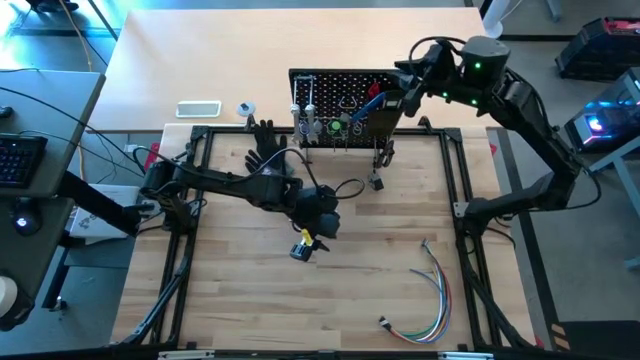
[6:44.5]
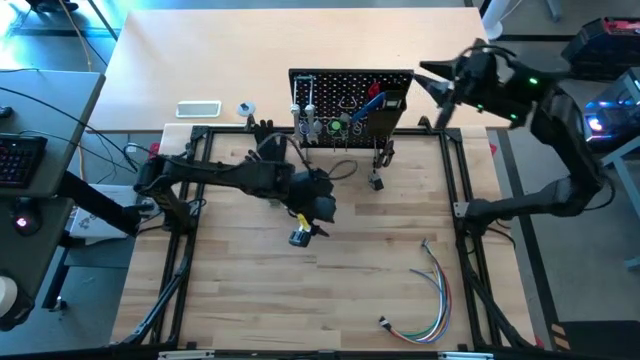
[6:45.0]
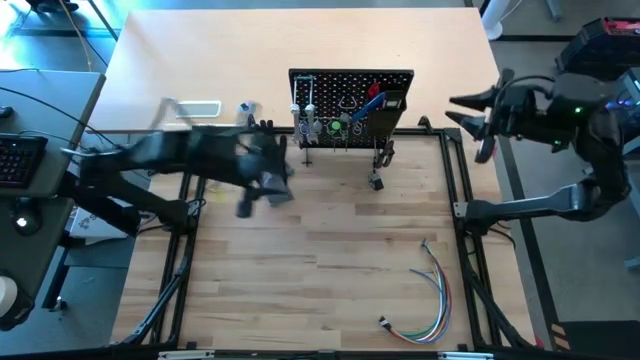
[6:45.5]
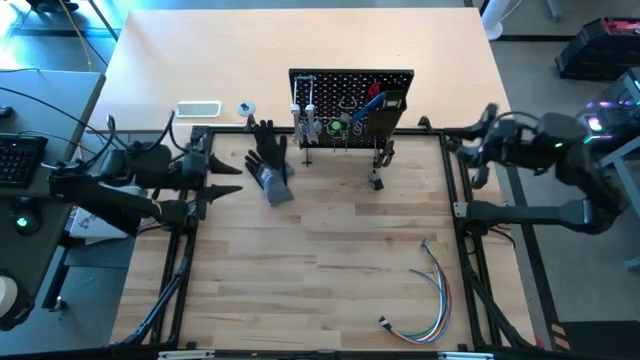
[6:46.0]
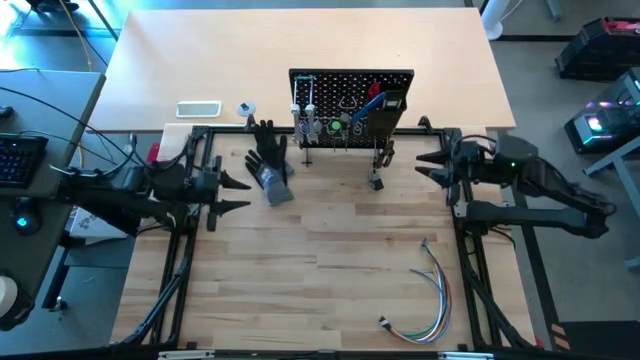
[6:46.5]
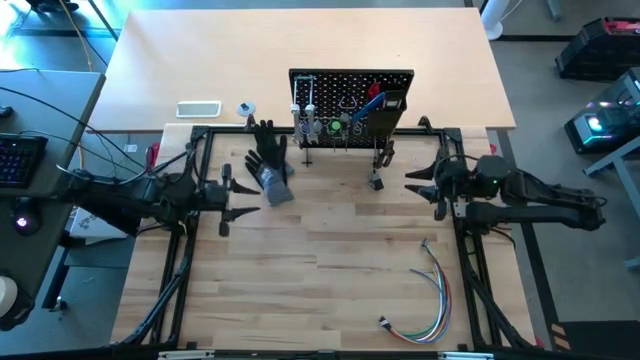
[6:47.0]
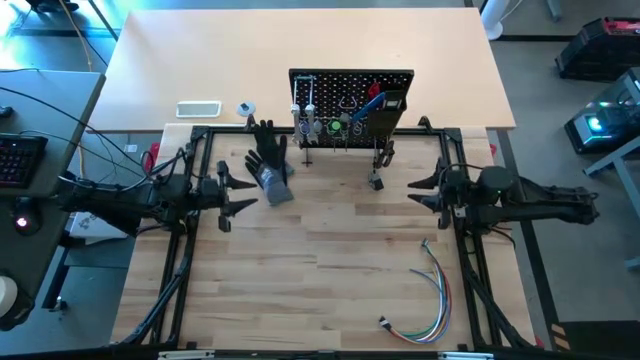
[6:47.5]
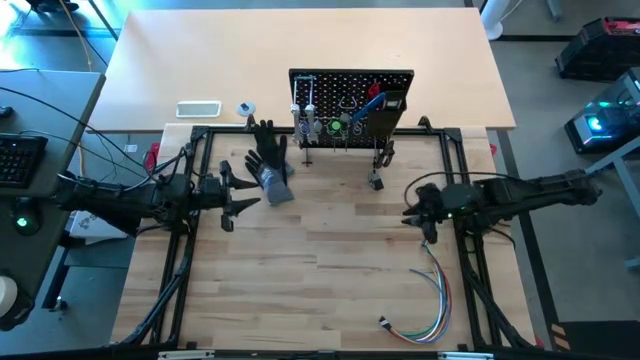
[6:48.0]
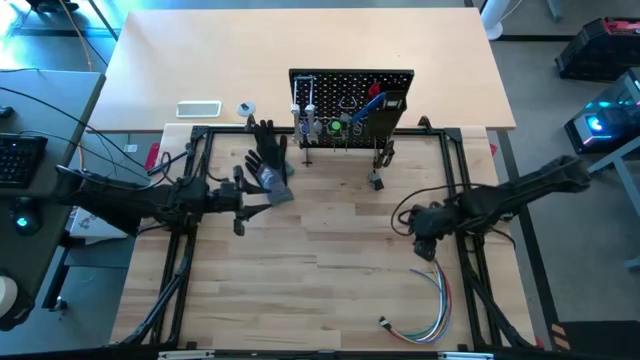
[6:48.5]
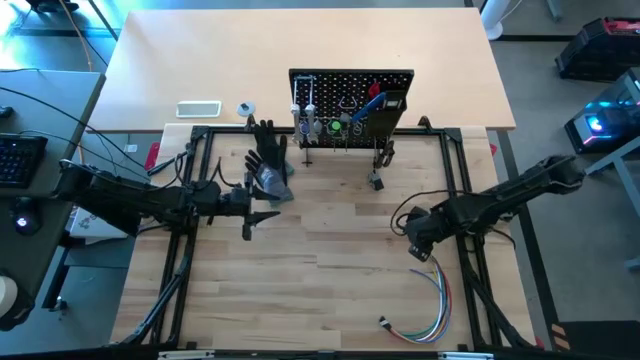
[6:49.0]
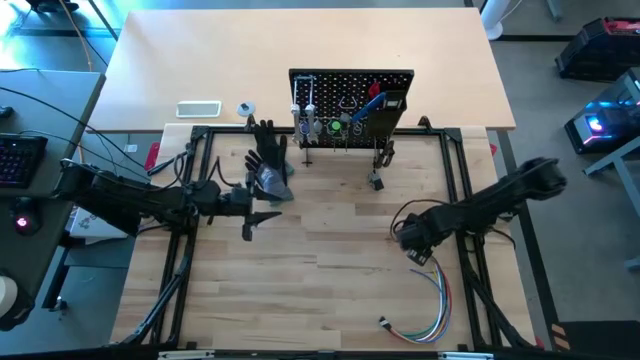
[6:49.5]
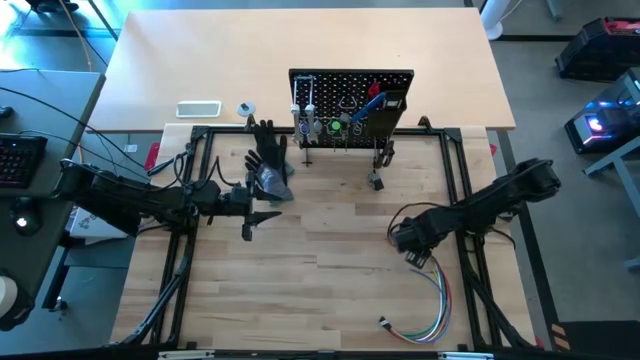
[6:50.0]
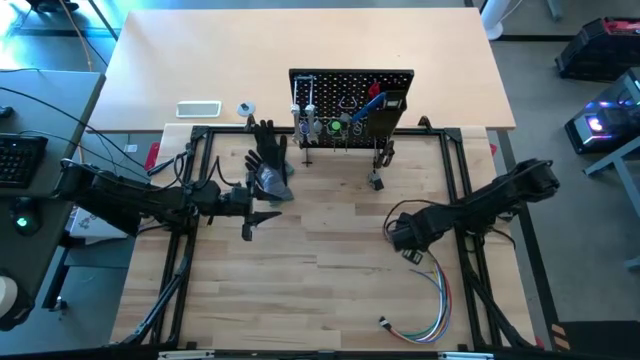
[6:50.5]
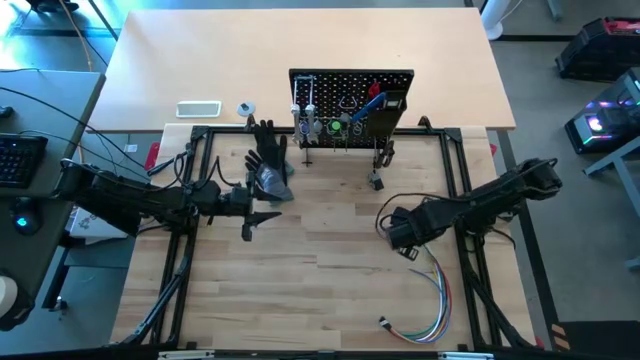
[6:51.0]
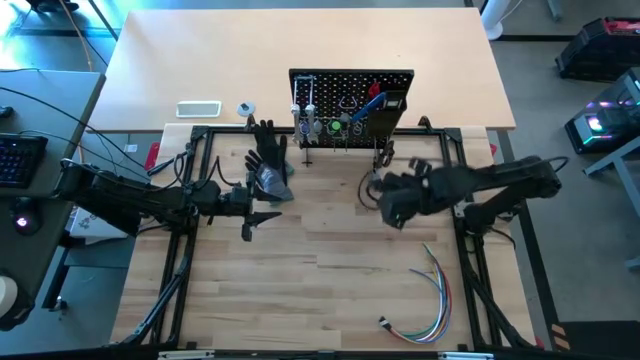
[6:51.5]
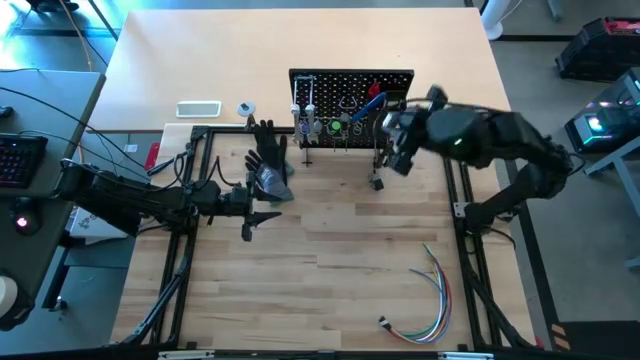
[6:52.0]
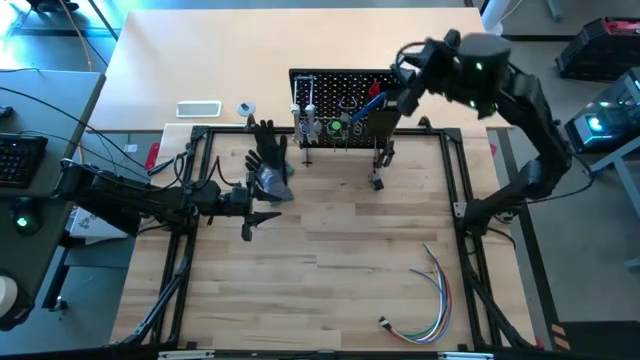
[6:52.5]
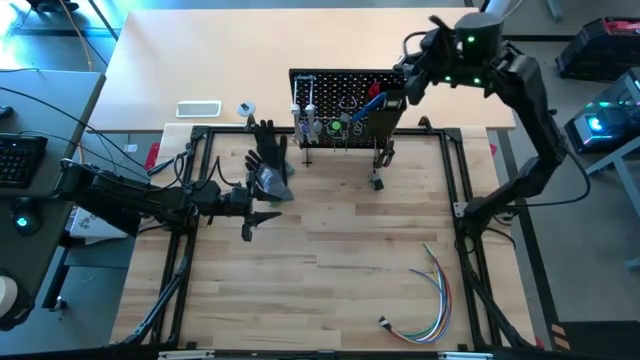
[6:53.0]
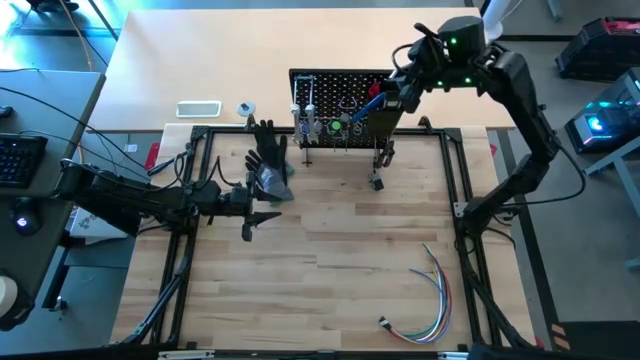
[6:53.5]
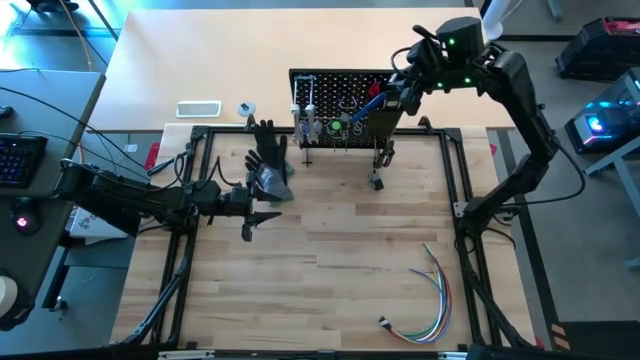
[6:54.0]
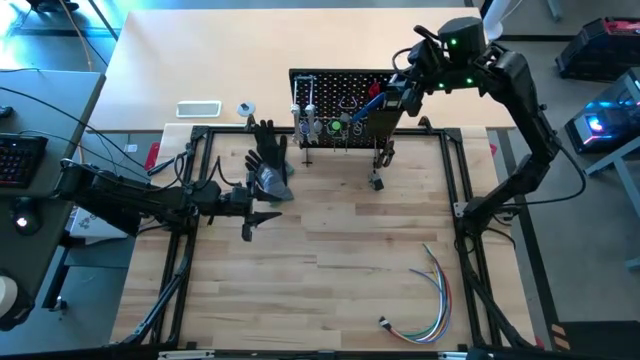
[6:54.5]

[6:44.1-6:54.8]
Task: Hang tools onto peg board
Put the silver socket into the black bin on the pegboard

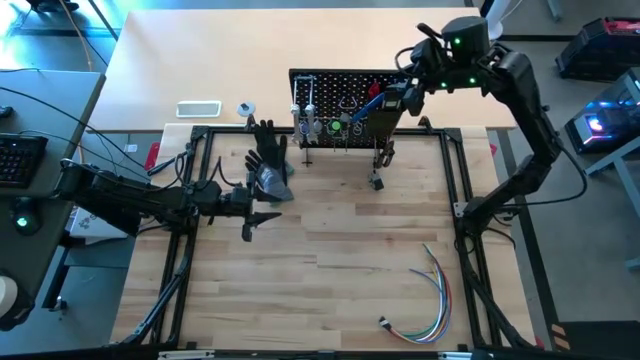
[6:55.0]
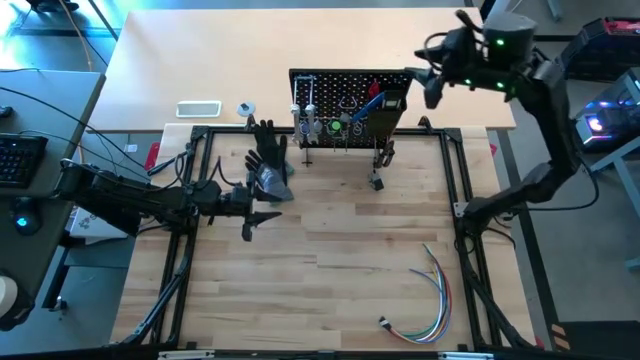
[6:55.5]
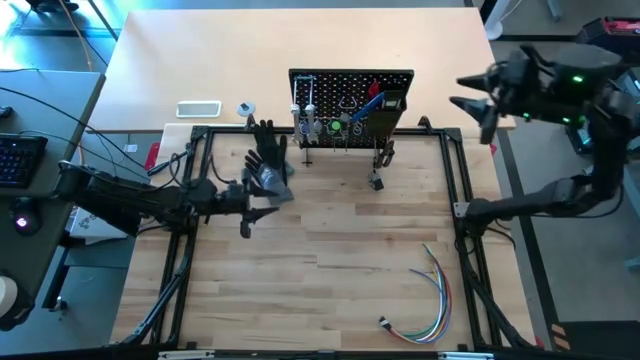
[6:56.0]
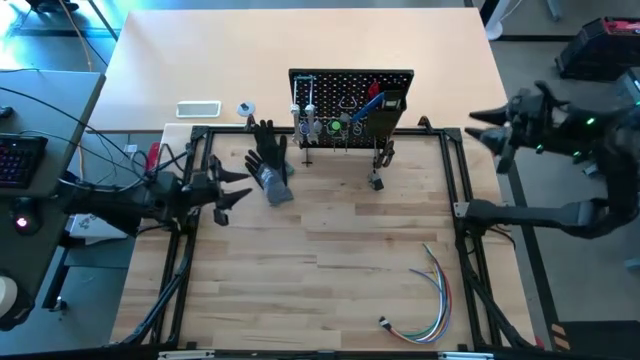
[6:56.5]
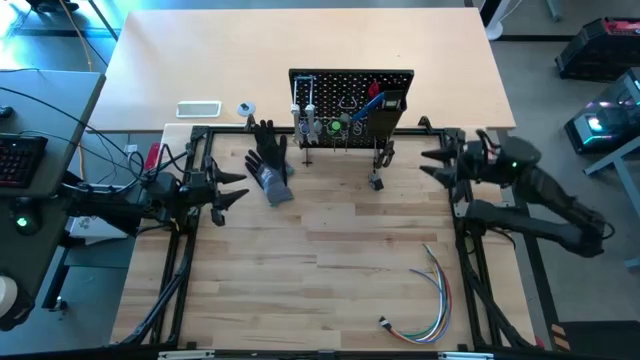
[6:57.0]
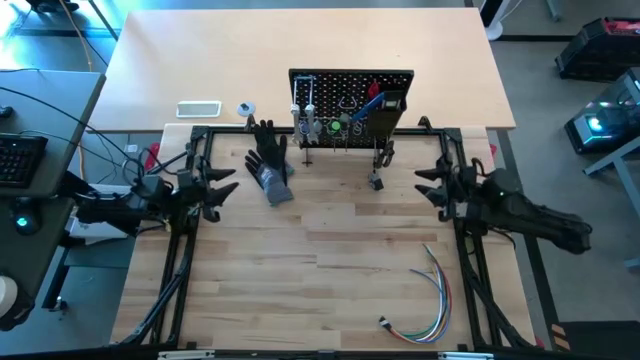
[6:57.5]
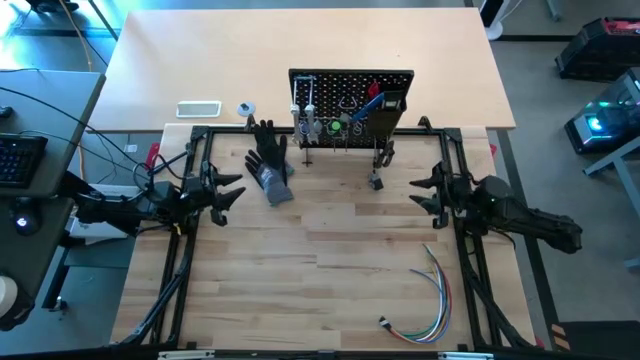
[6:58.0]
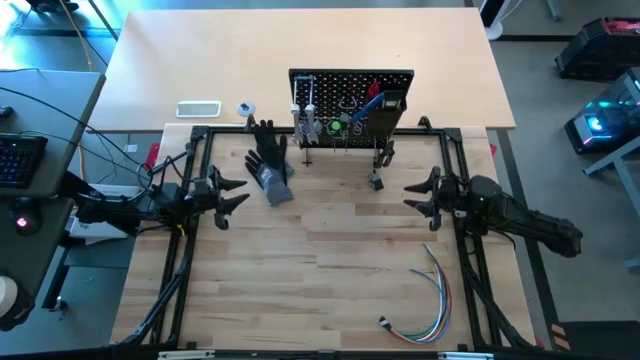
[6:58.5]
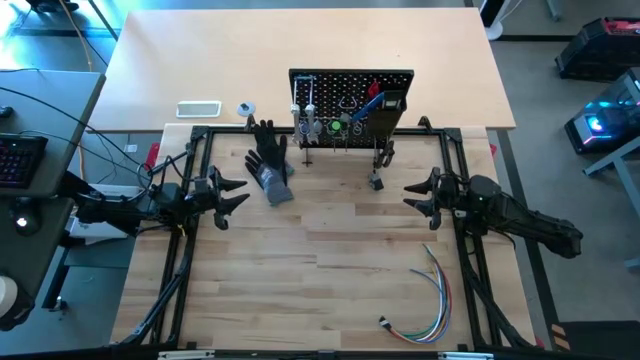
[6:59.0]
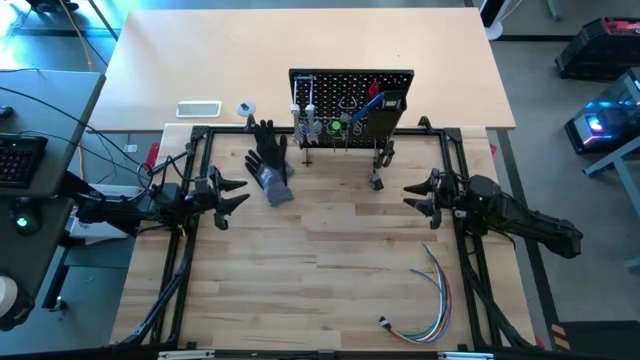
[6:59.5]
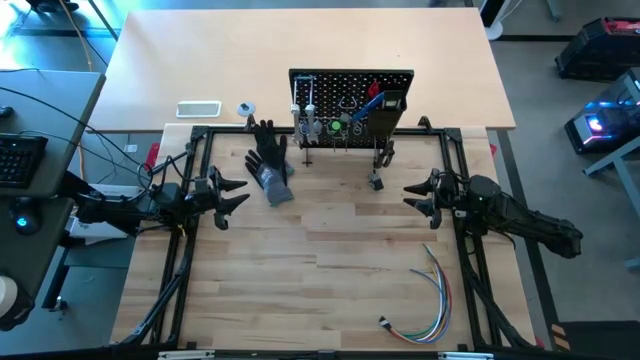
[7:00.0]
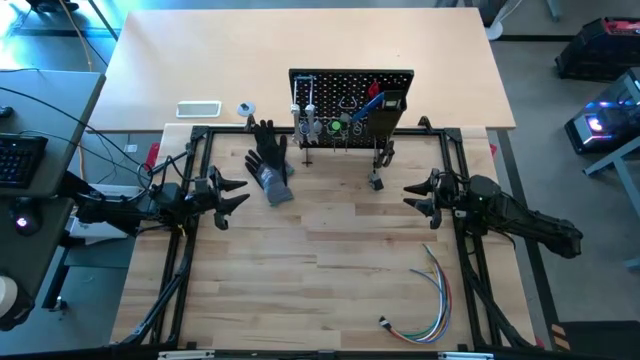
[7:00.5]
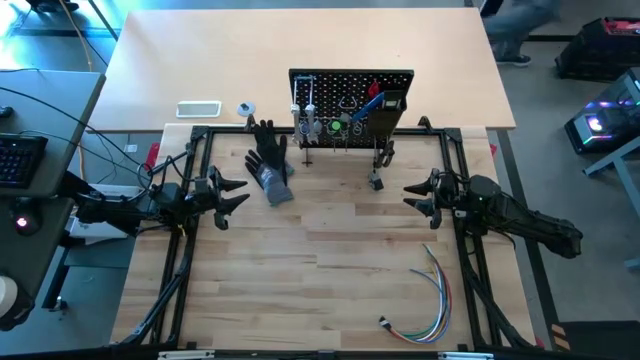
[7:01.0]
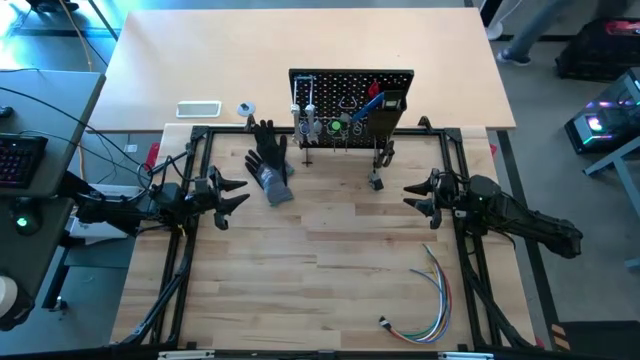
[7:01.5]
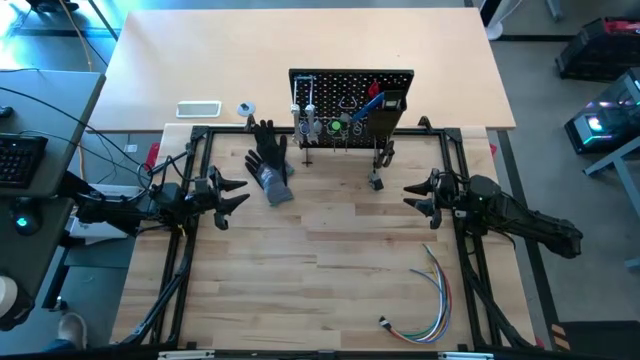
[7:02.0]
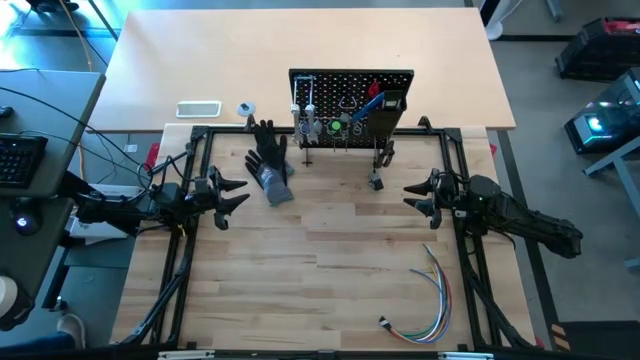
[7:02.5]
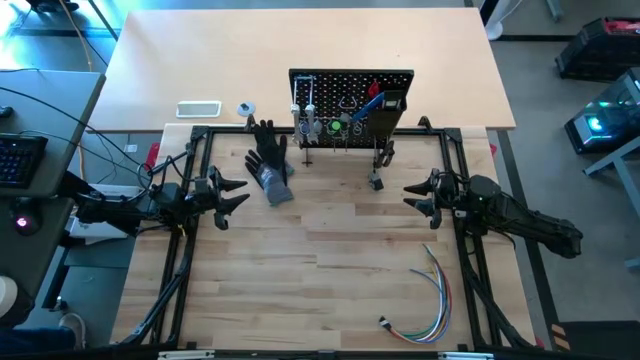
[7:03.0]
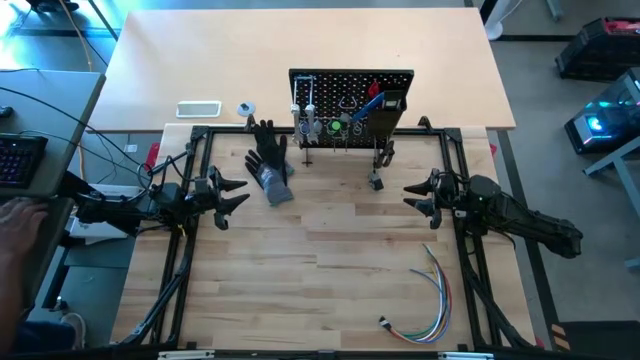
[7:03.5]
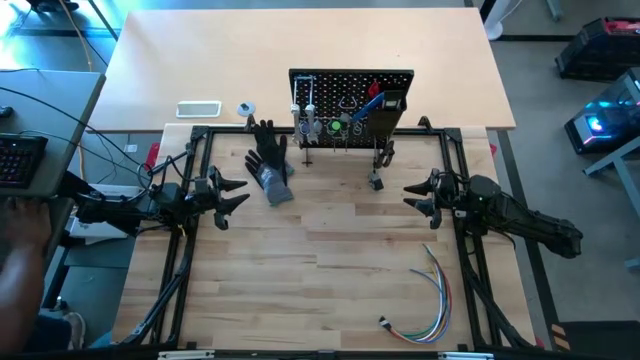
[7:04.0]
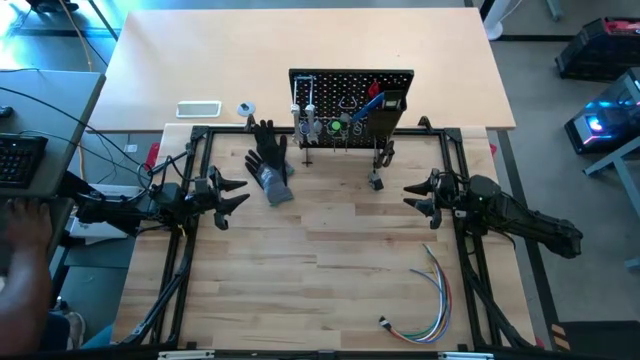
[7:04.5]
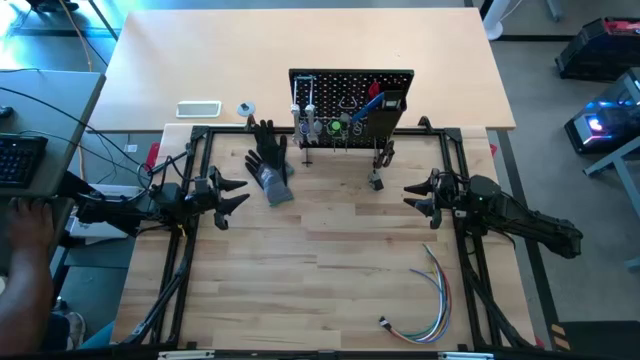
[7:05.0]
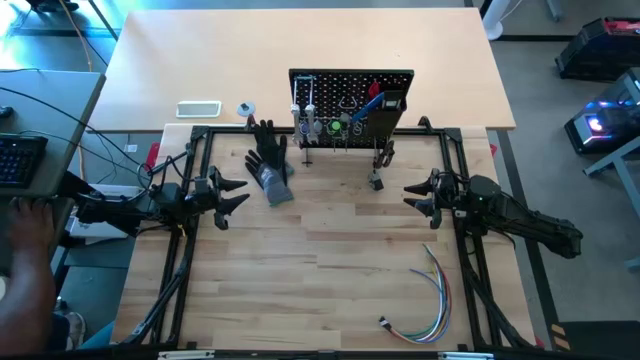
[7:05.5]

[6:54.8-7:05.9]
Return to Home Position
